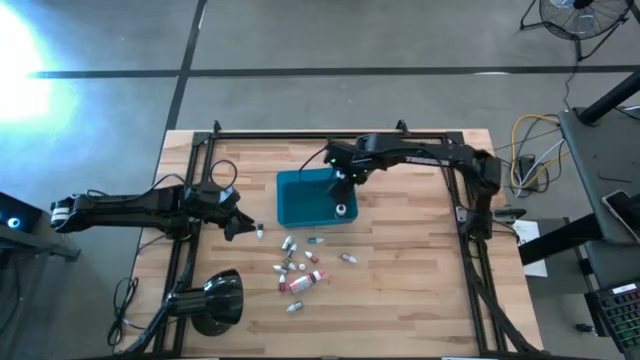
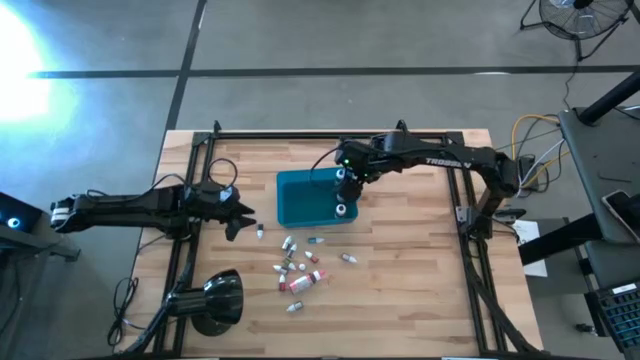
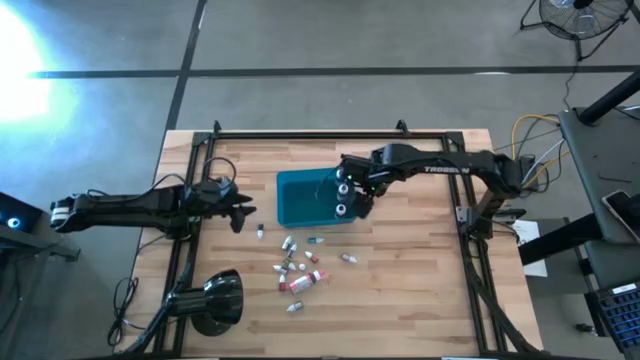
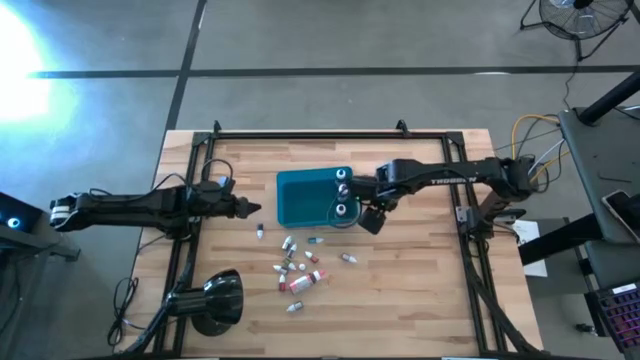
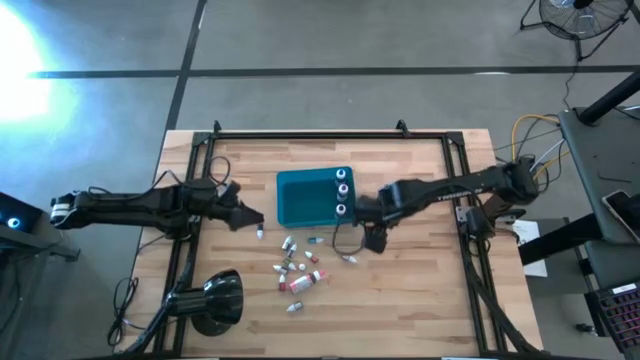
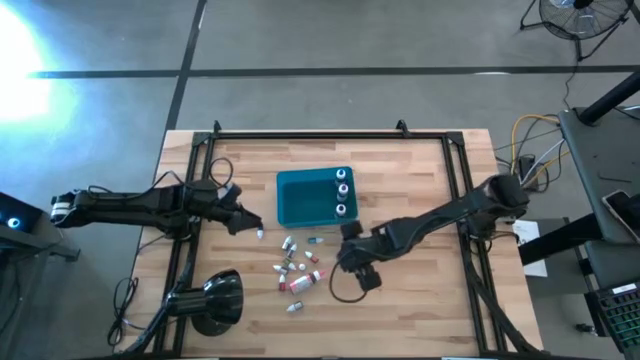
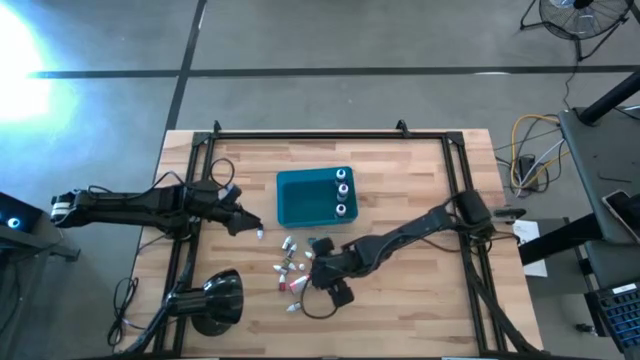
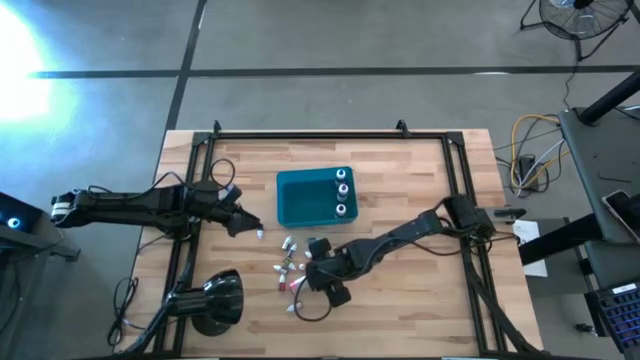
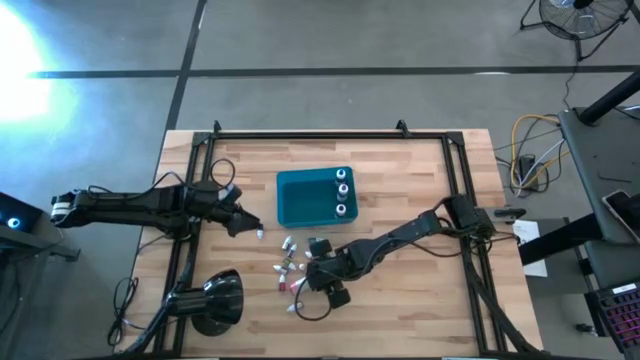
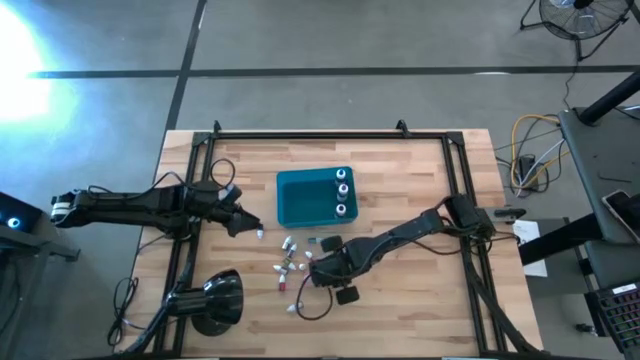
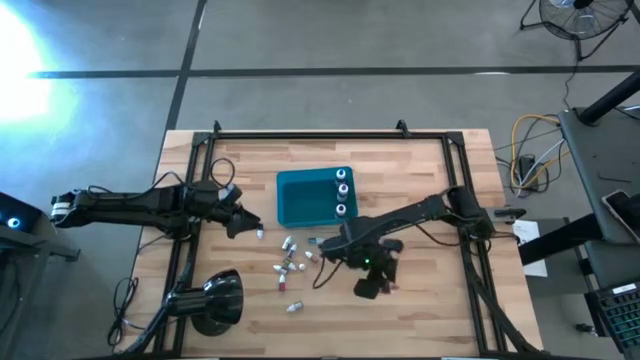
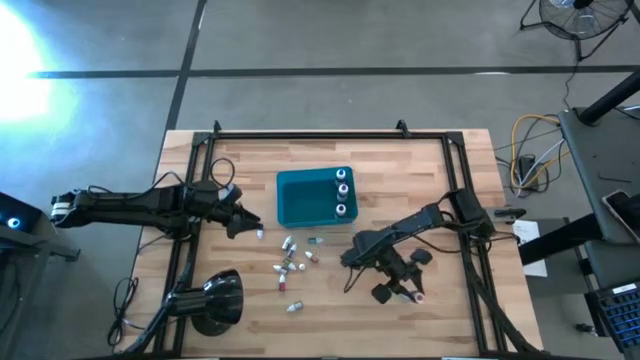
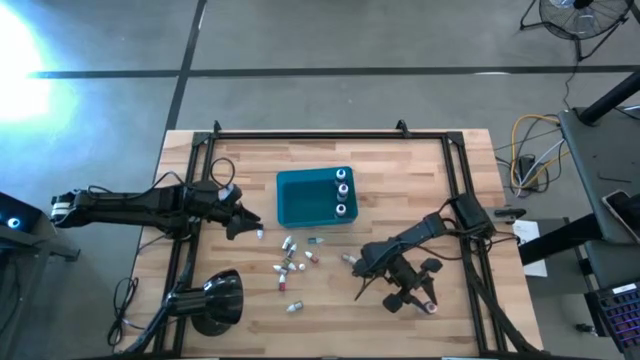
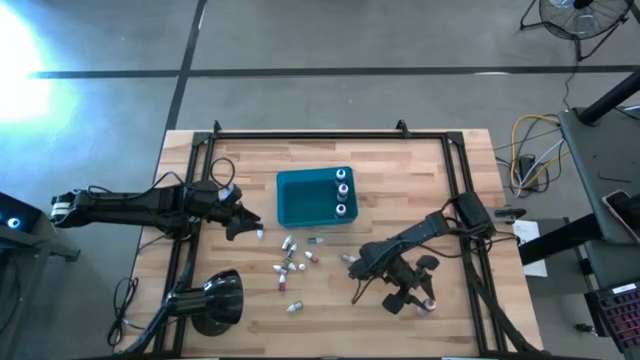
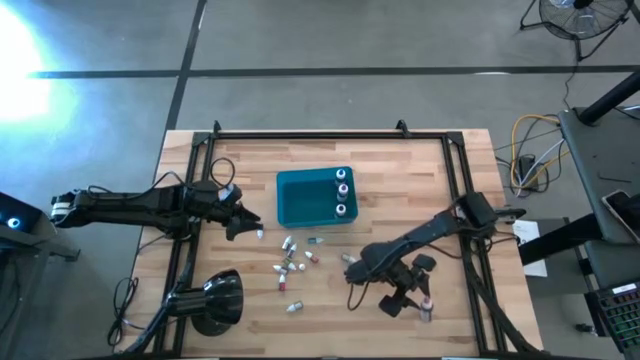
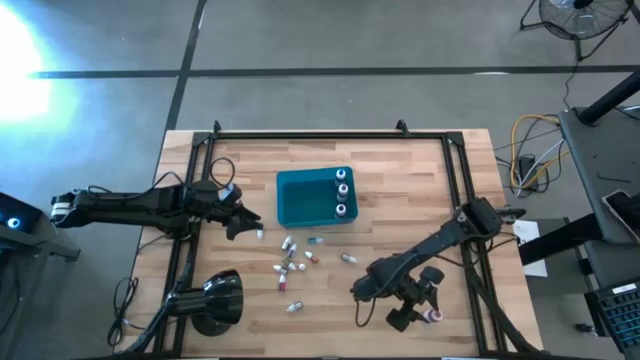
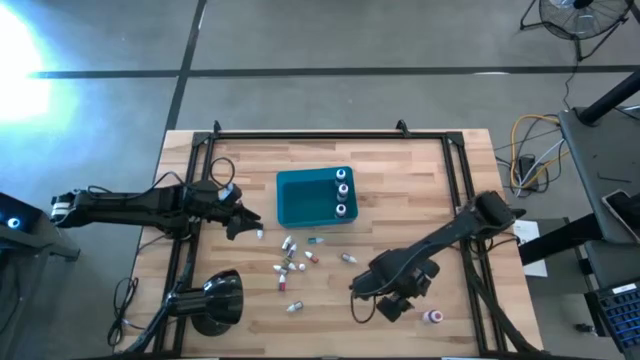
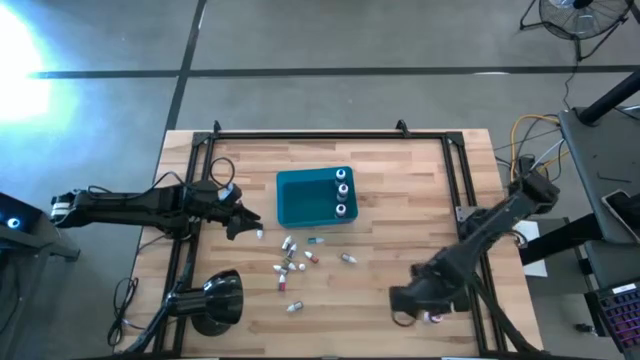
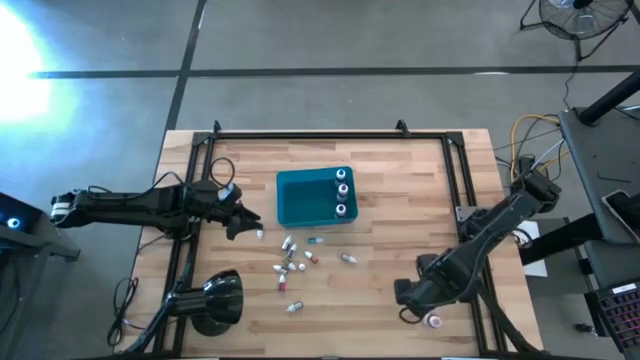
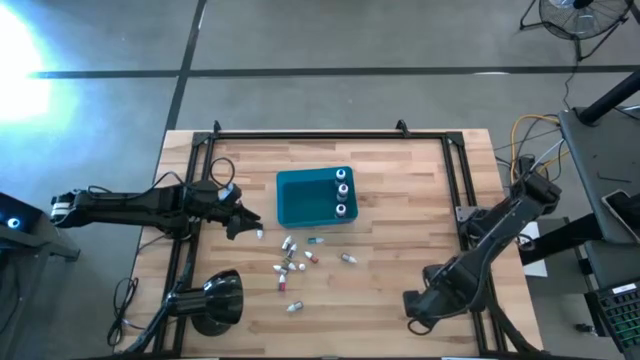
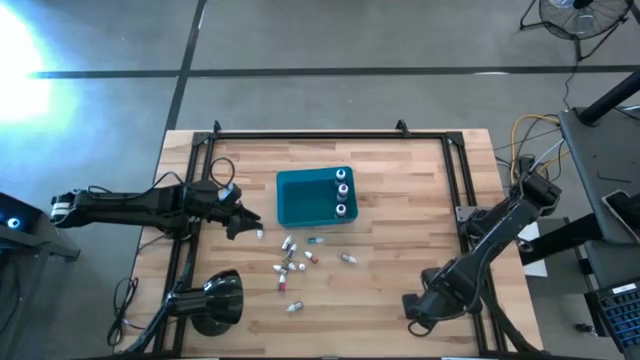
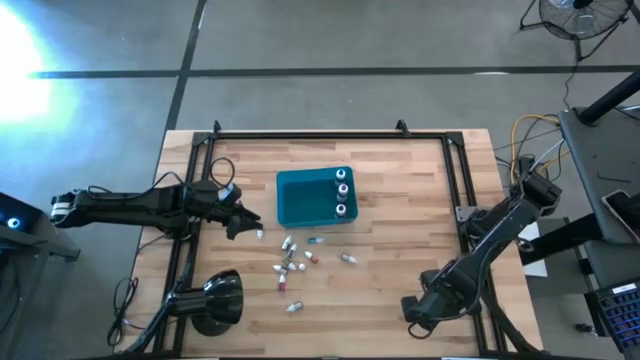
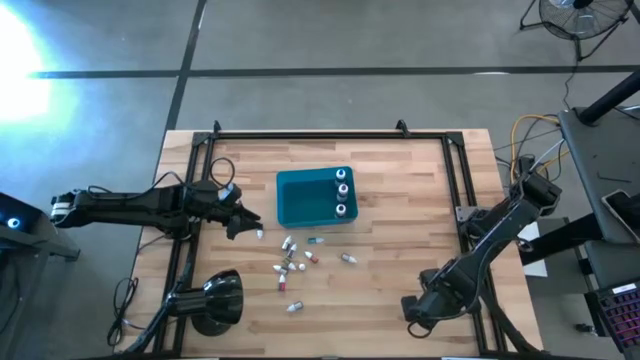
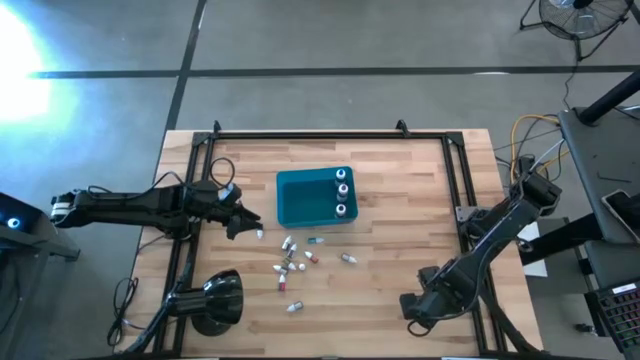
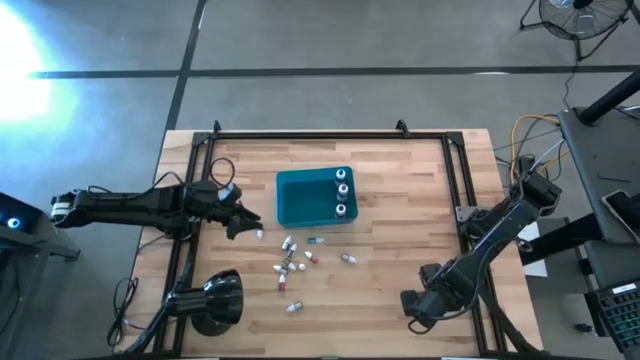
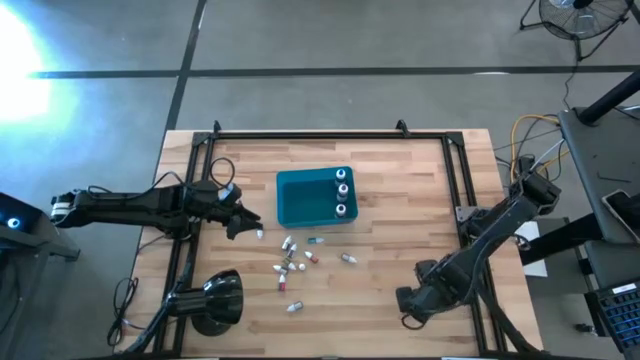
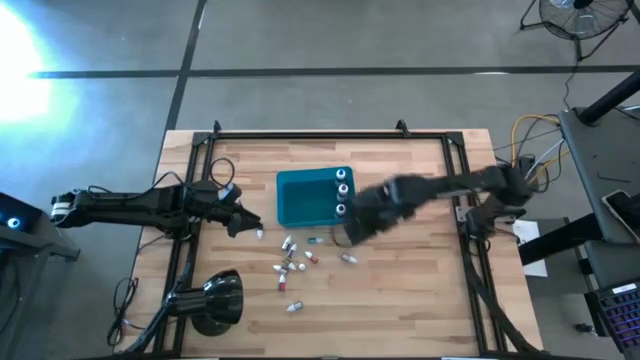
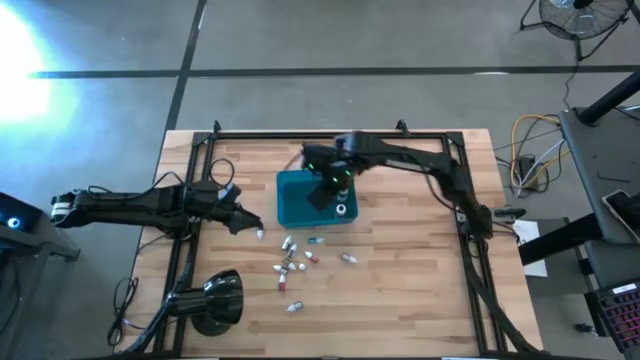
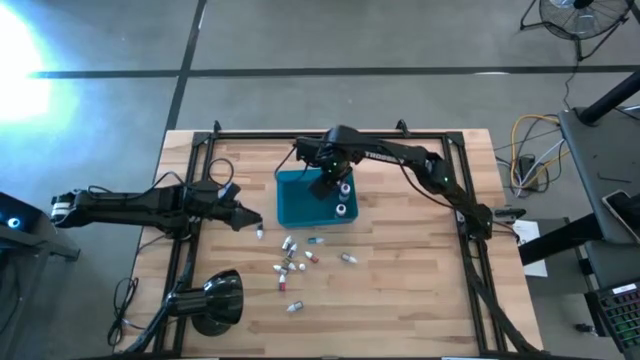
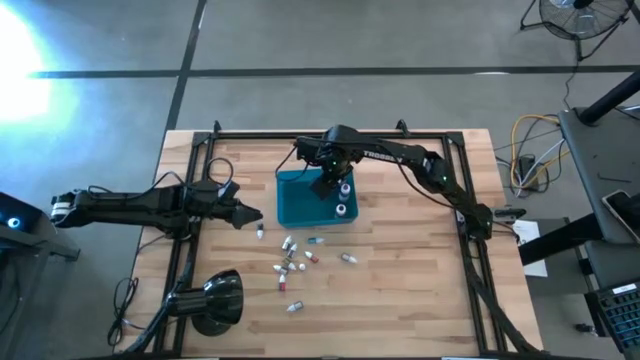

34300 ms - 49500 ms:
Task: Pick & Place food coloring
Put the large pink food coloring bottle into the blue bin

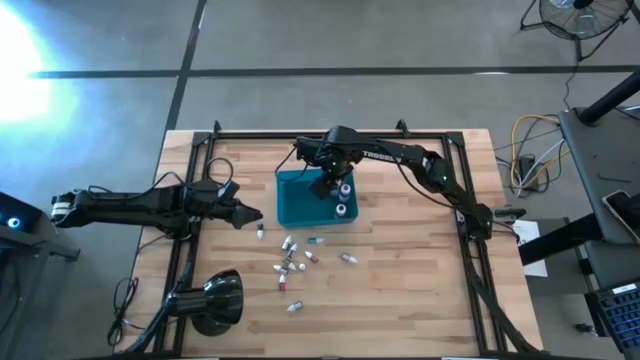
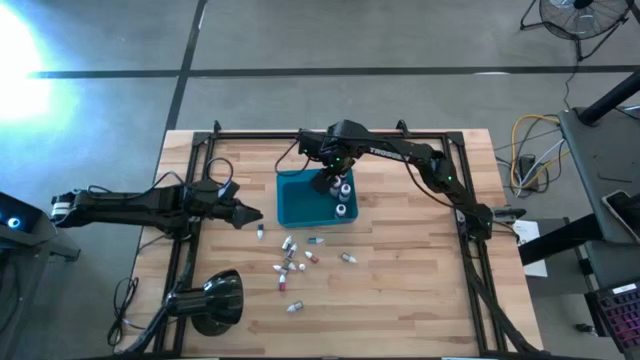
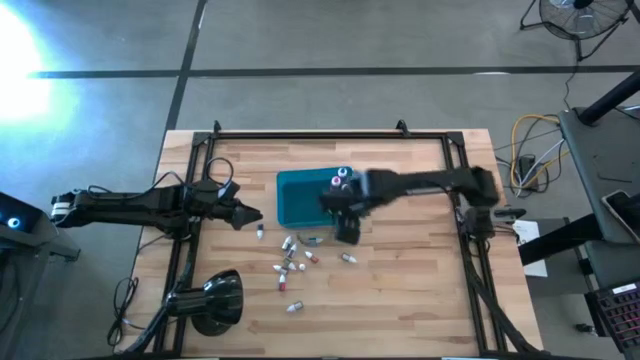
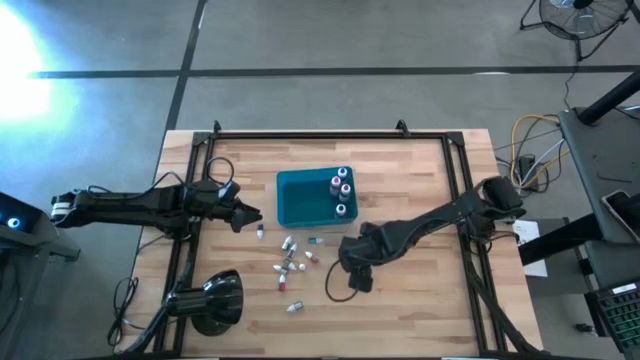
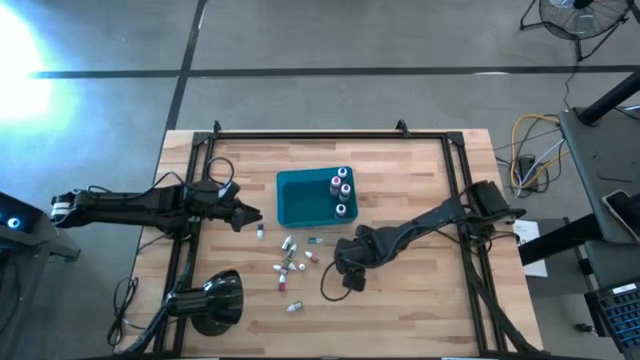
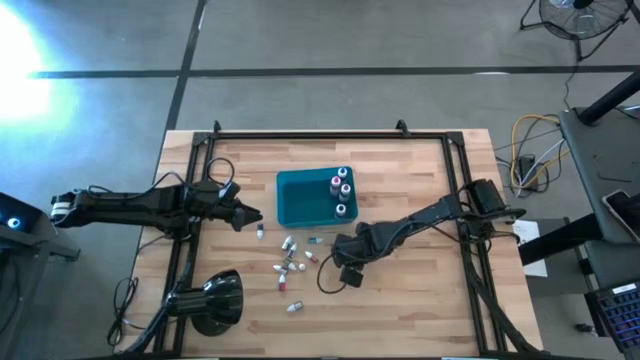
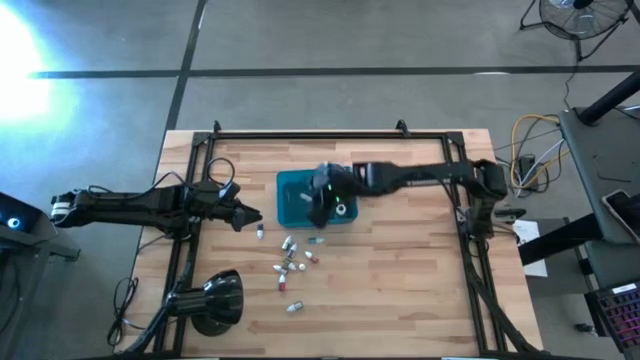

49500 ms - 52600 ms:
Put the small violet food coloring bottle into the blue bin

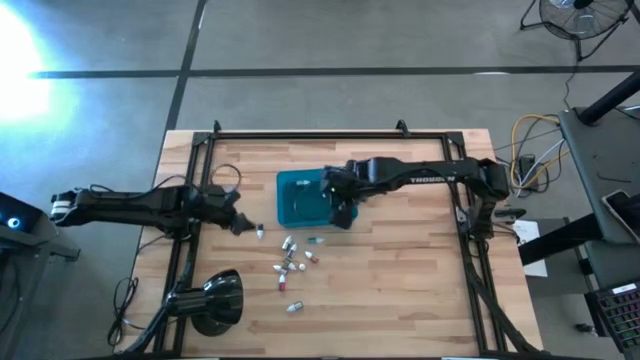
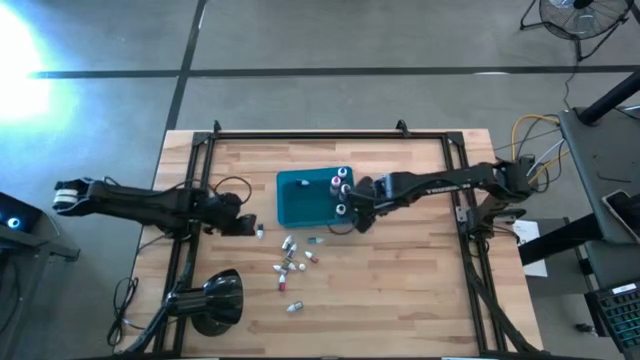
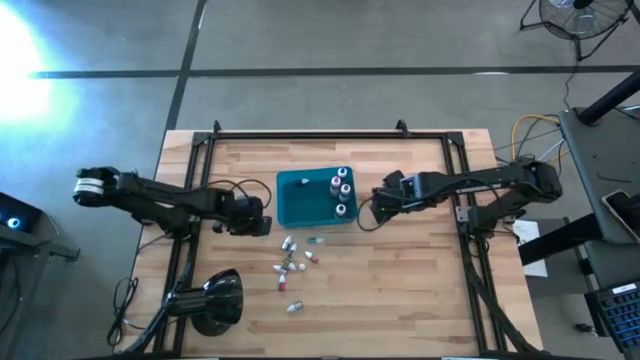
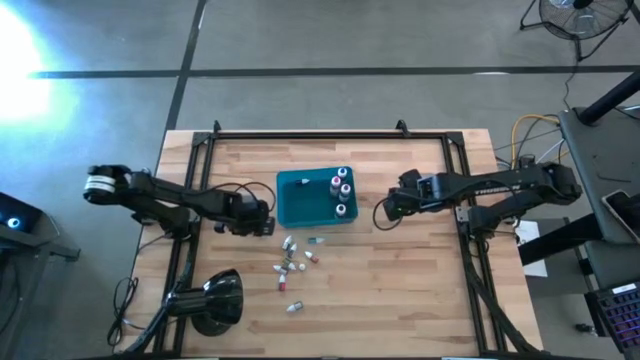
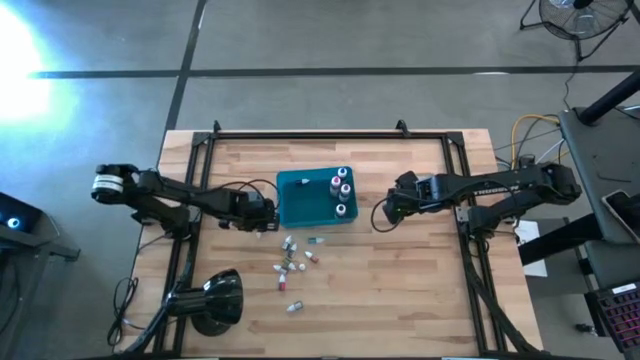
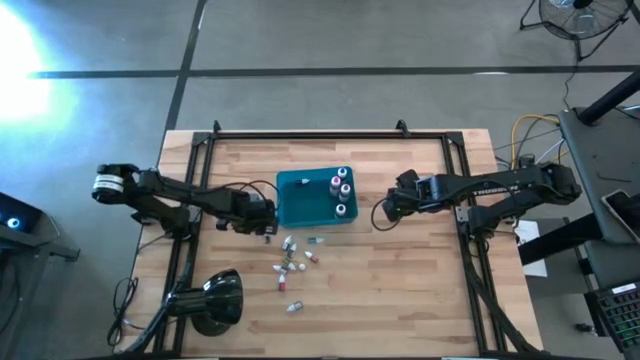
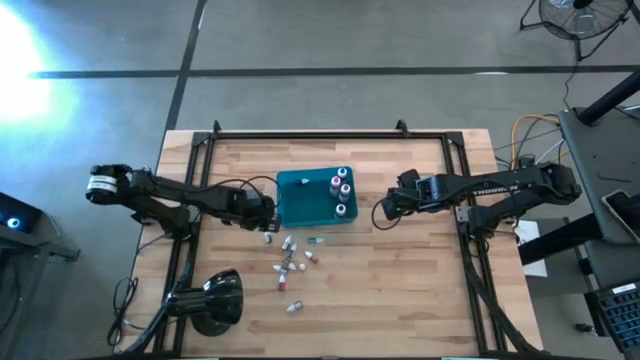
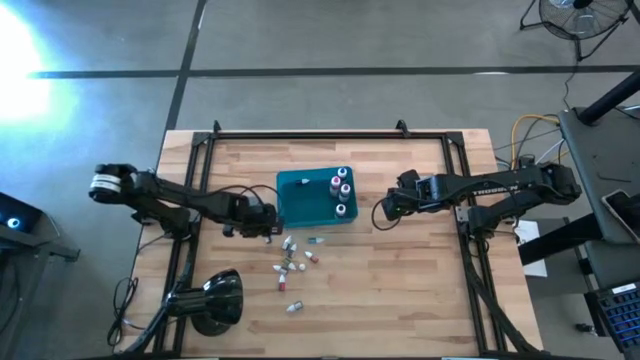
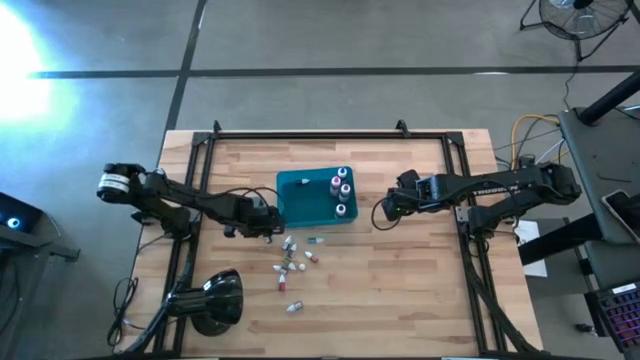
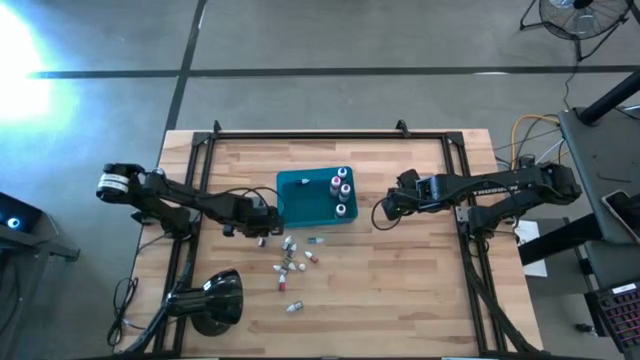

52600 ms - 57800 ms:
Put the small black food coloring bottle into the blue bin
